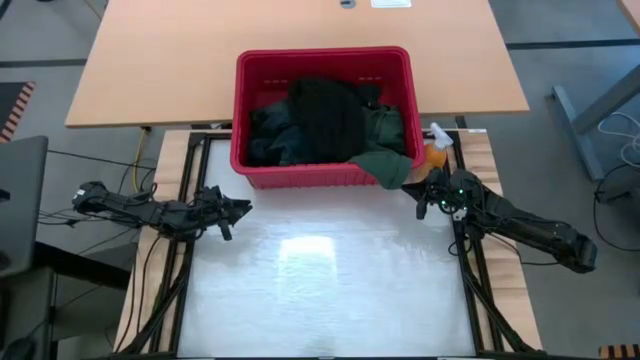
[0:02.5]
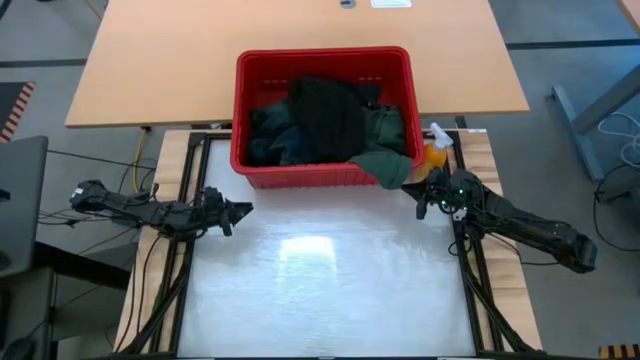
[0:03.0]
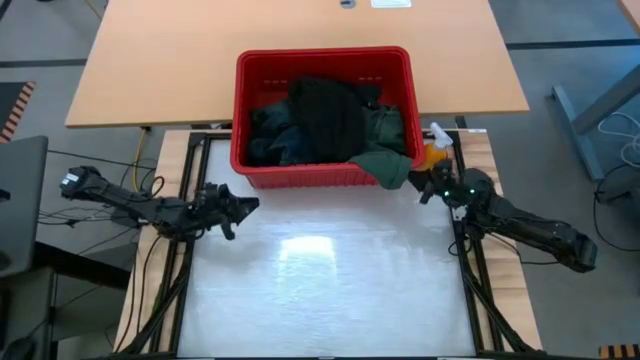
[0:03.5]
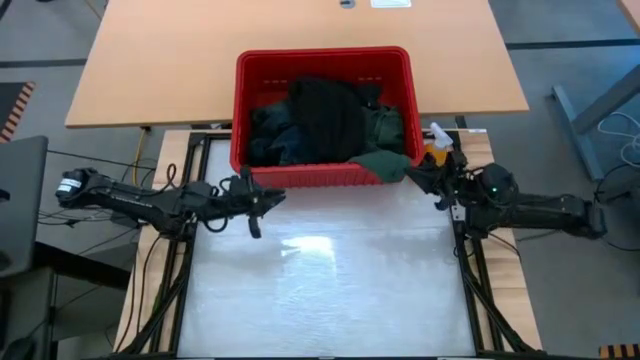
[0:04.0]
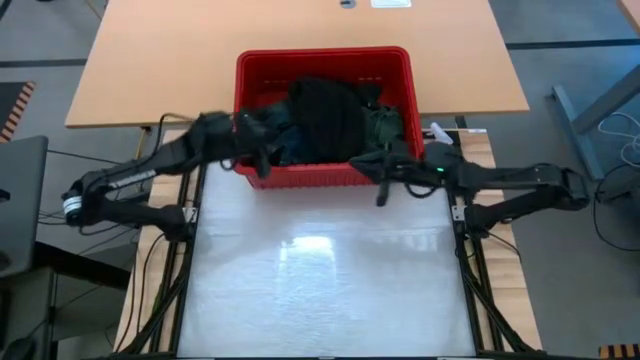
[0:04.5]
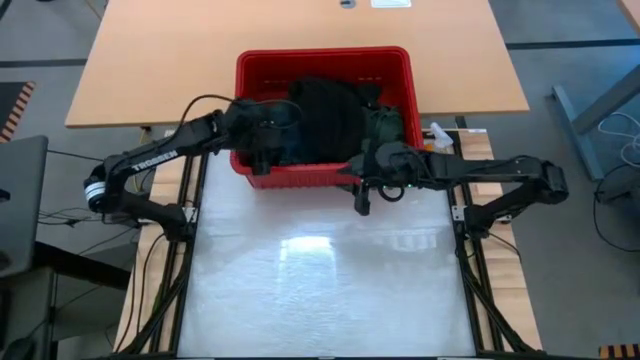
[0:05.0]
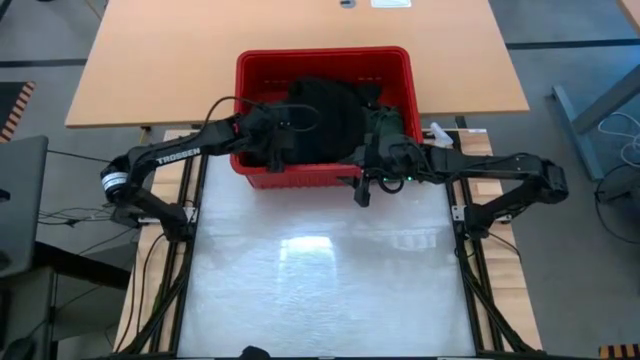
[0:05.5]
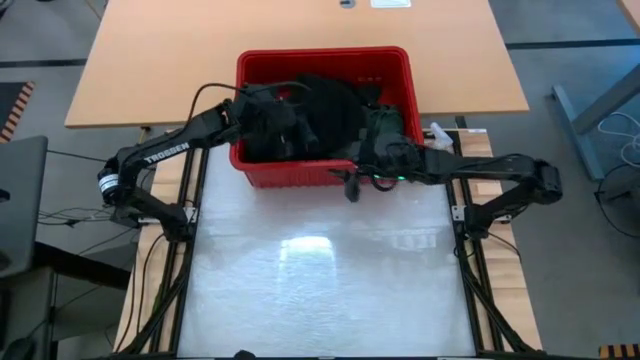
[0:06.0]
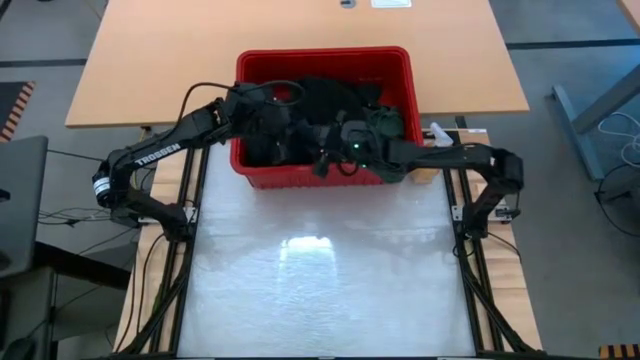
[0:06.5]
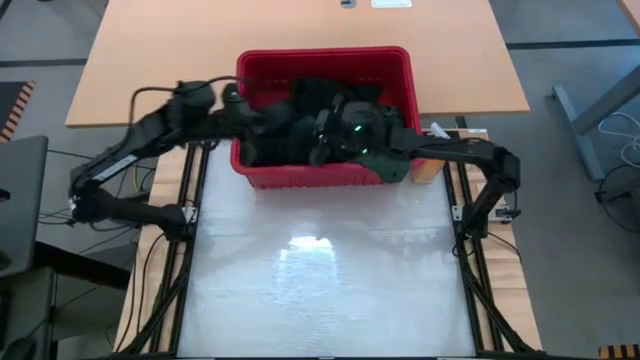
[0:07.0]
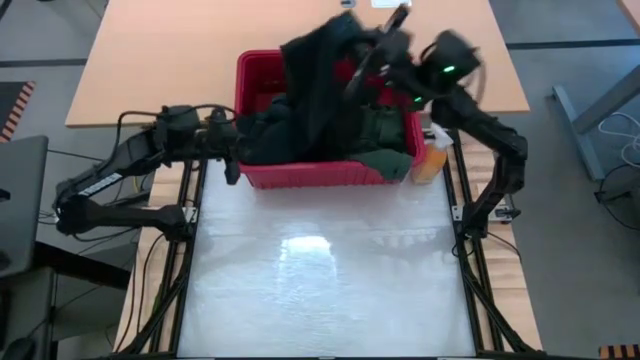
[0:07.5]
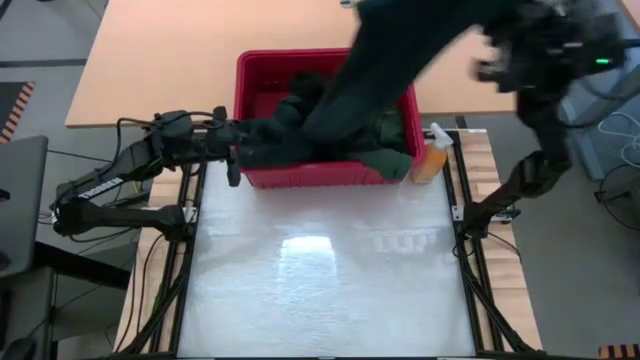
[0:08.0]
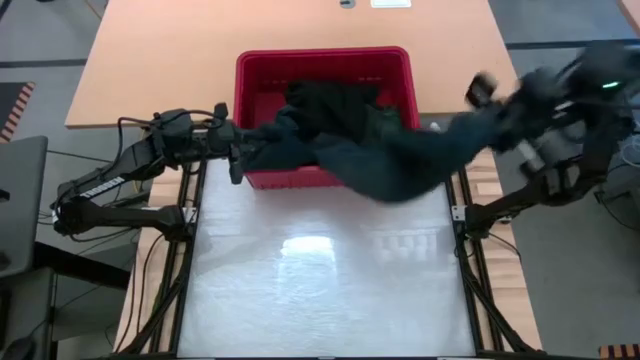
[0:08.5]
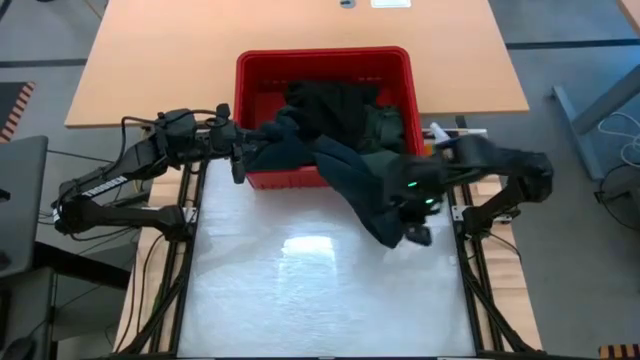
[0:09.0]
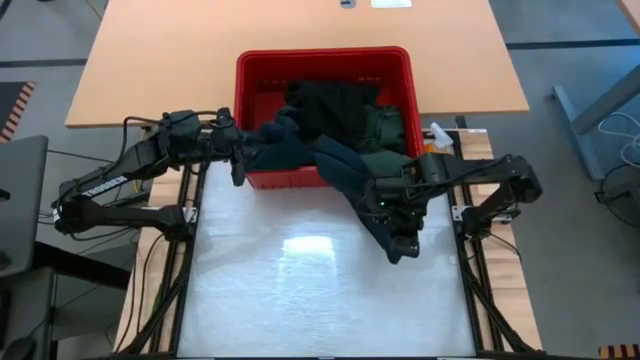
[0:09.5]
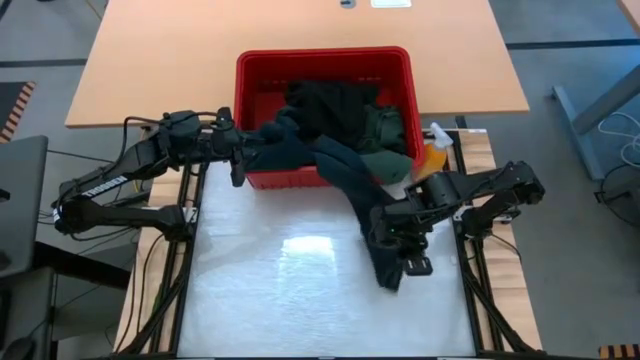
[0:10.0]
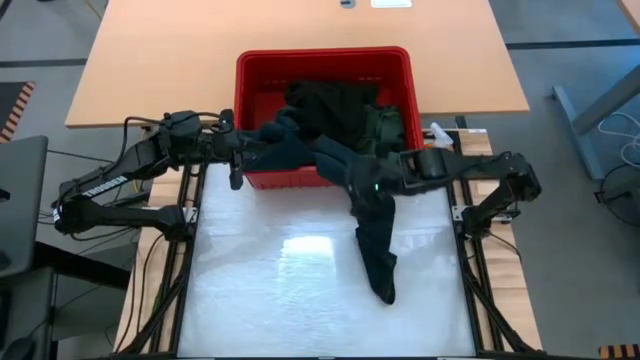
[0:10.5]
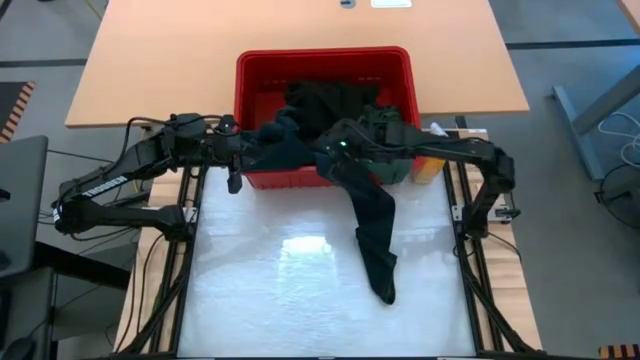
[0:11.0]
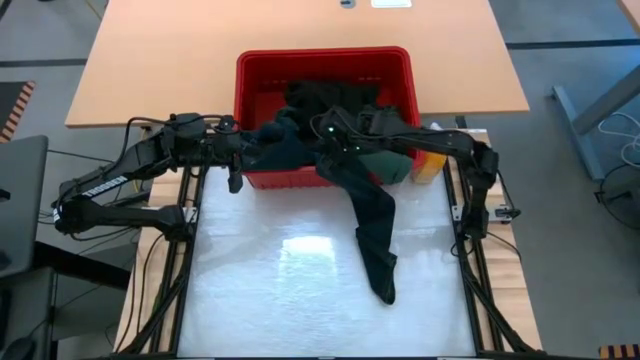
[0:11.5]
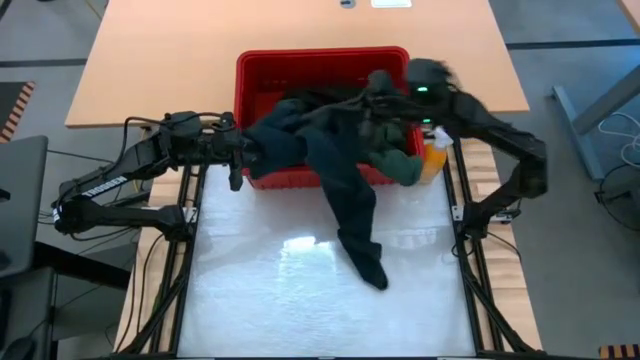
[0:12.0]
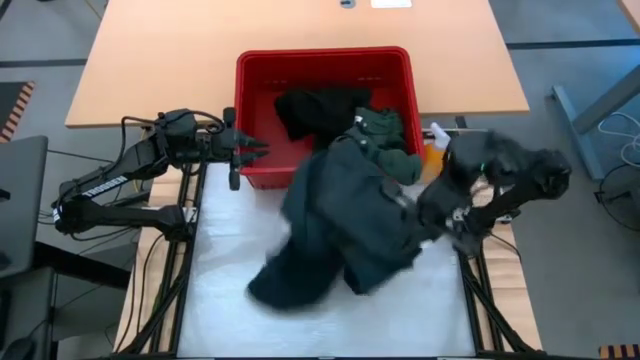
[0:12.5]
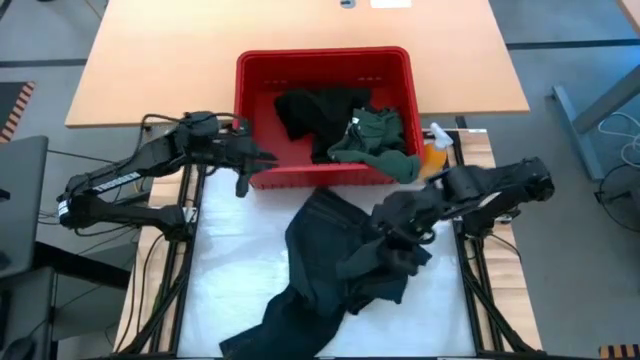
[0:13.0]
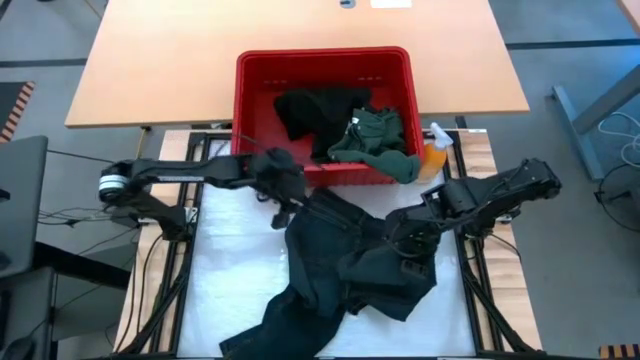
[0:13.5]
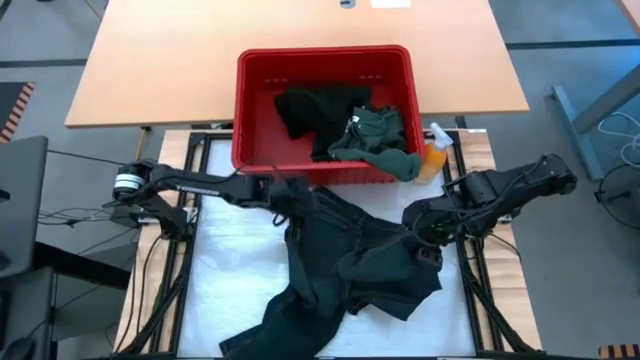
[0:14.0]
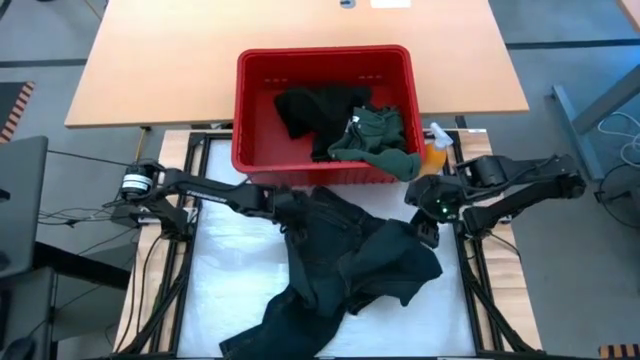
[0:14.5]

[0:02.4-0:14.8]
Task: Fold laundry
Remove the black pants from the red bin
